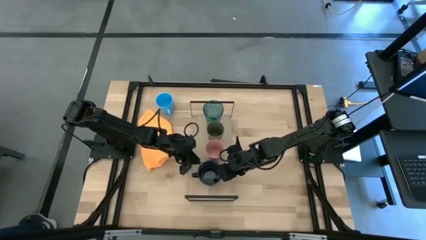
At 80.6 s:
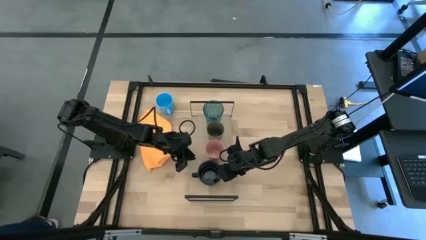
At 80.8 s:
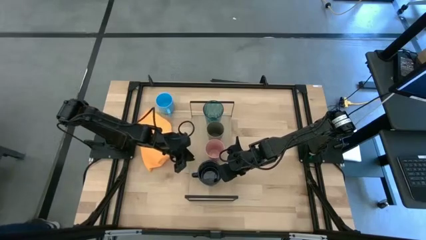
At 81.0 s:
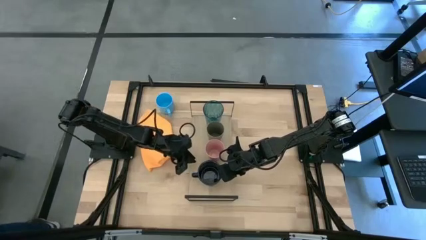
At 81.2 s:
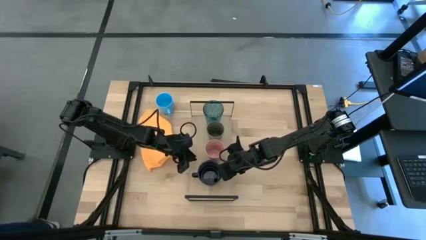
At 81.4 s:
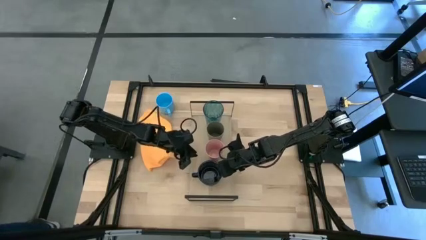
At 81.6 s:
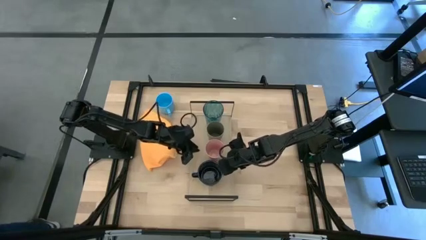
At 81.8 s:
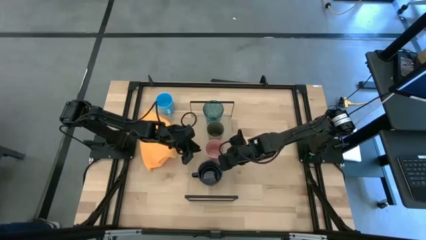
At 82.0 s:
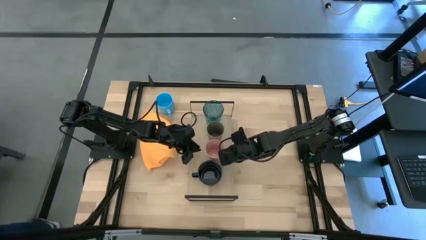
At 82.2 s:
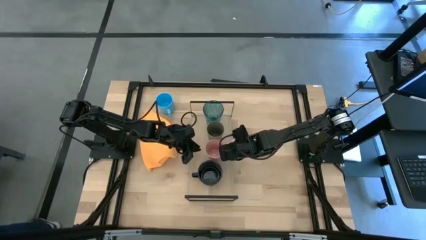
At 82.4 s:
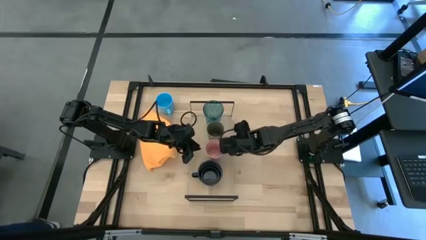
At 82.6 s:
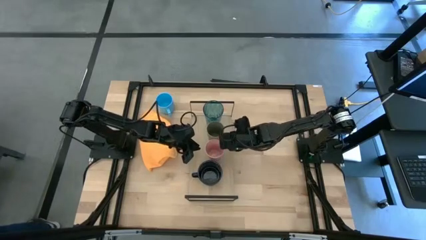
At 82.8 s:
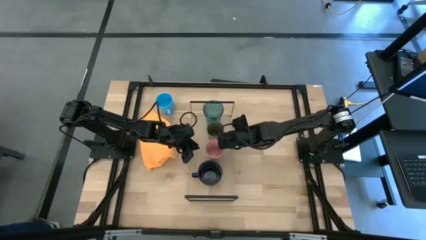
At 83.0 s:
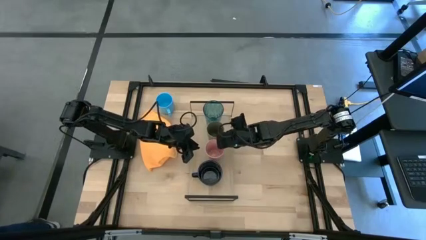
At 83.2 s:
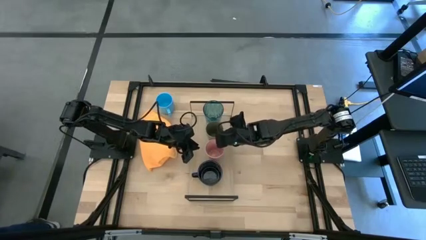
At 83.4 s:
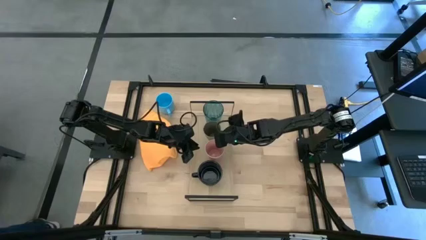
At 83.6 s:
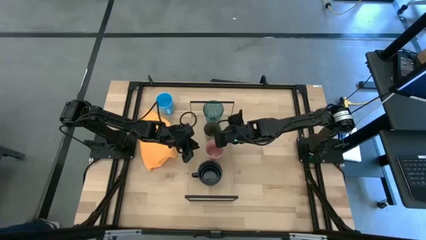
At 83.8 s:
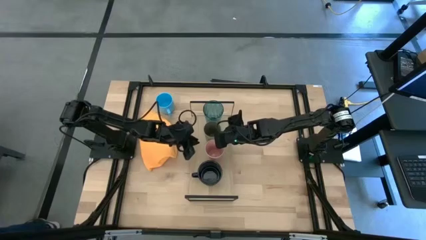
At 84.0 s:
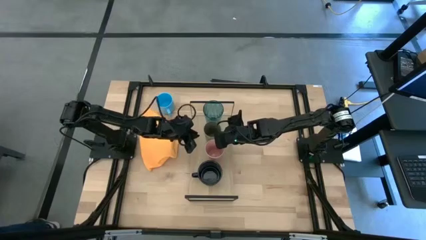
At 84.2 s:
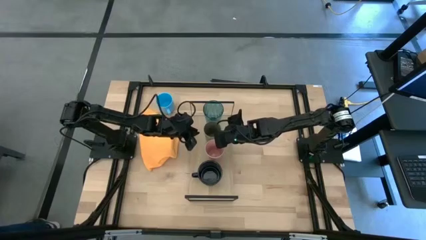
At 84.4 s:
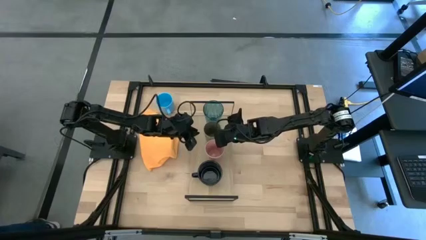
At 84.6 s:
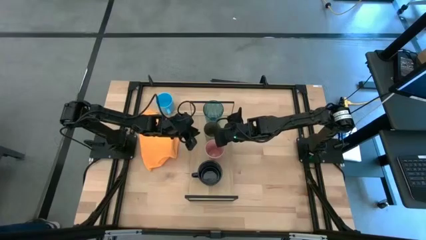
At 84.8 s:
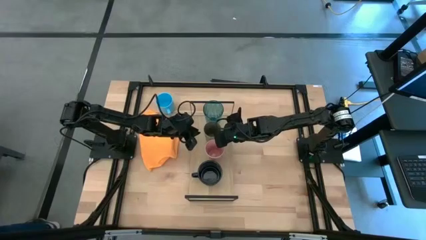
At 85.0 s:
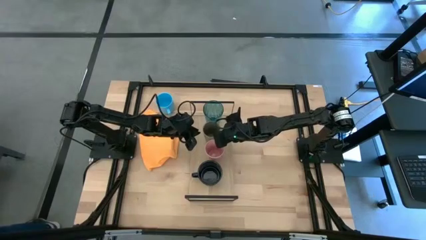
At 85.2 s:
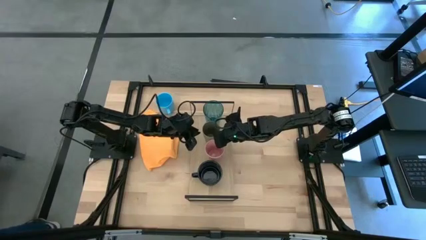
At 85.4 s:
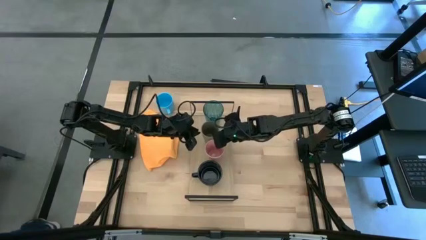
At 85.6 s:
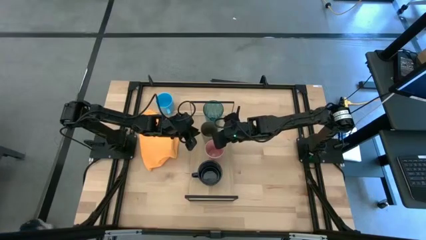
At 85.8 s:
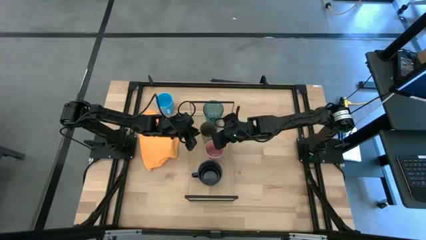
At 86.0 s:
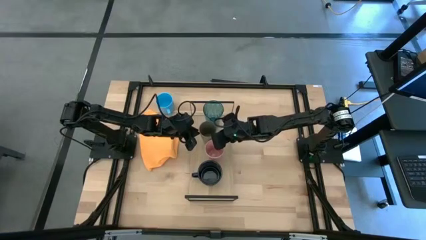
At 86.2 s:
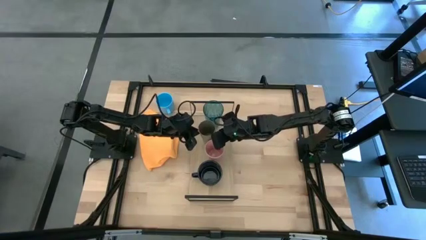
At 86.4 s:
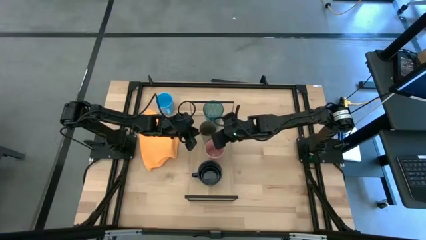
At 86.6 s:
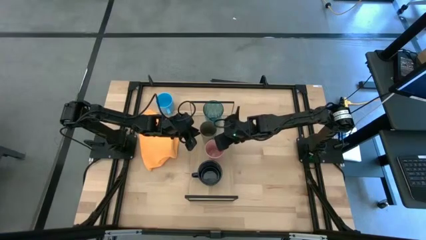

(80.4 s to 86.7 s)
Task: Stack small to large cups/mugs on shelf
Adjust the gray cup on the shelf

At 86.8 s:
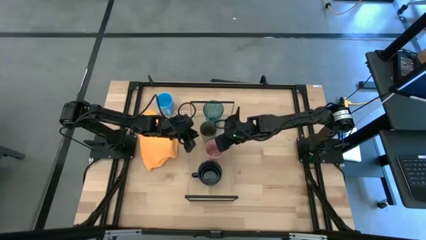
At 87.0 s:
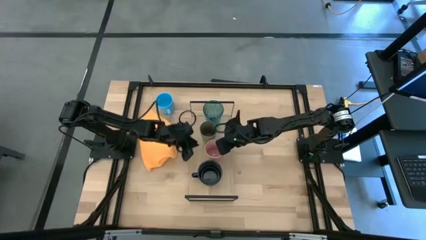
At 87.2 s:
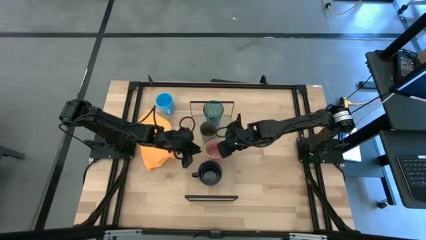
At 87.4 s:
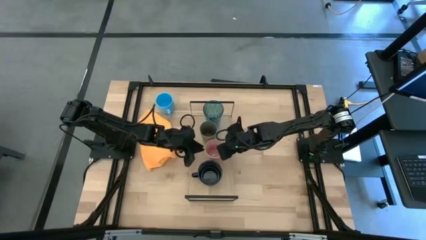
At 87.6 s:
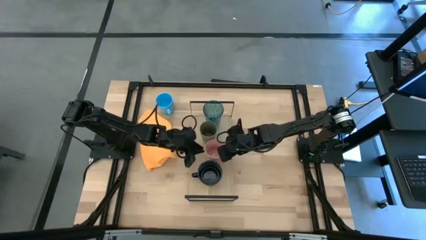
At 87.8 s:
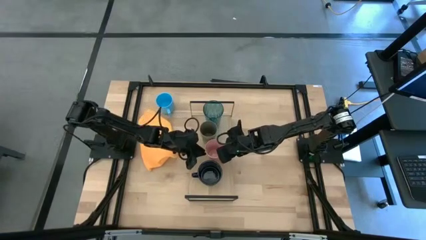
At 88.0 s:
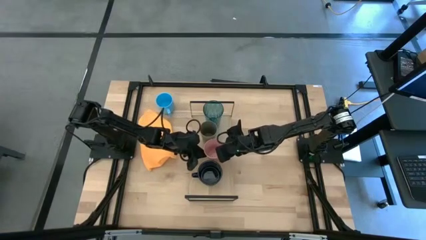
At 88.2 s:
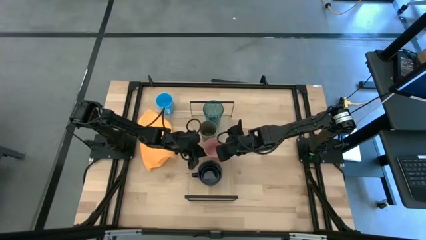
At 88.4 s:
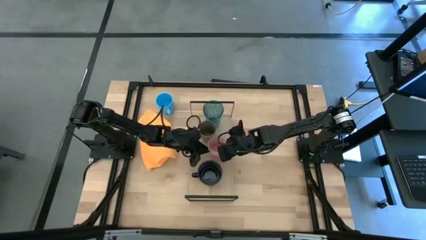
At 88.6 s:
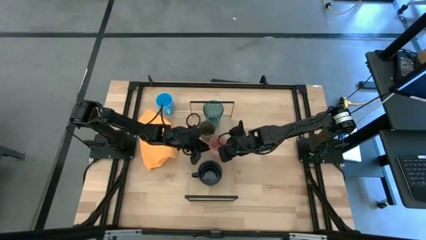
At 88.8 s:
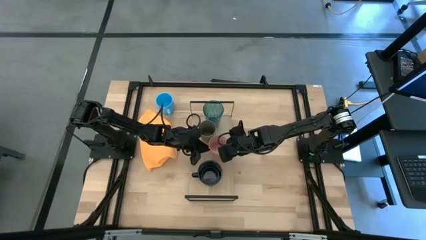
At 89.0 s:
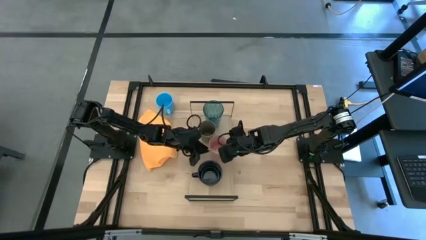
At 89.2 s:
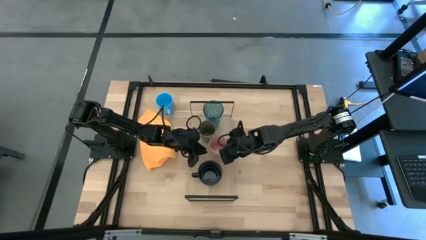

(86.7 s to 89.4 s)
Adjust the pink cup on the shelf

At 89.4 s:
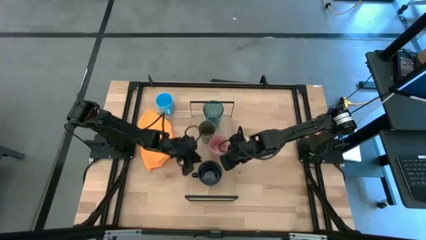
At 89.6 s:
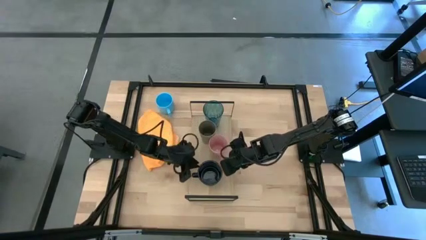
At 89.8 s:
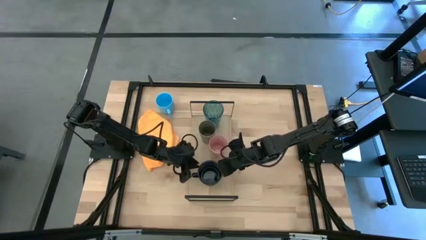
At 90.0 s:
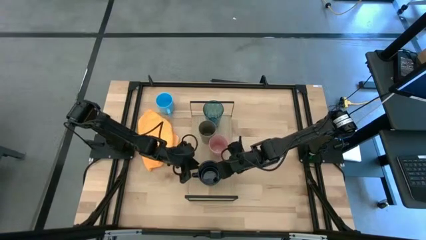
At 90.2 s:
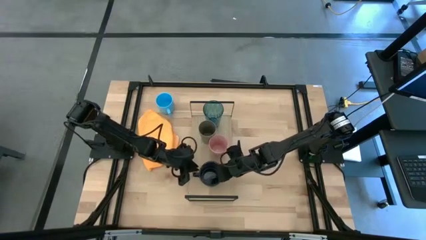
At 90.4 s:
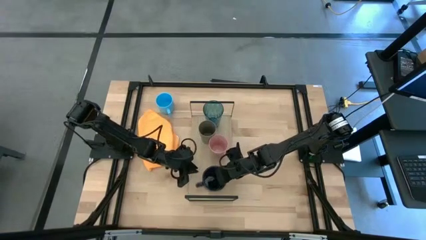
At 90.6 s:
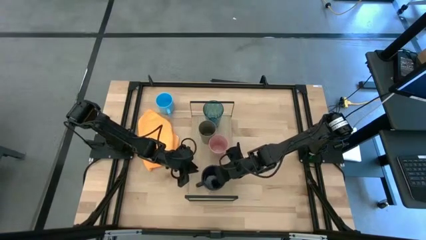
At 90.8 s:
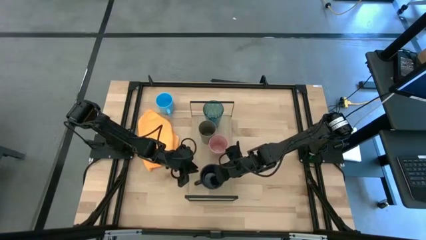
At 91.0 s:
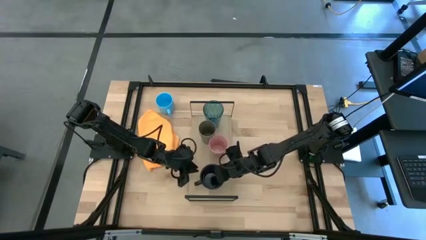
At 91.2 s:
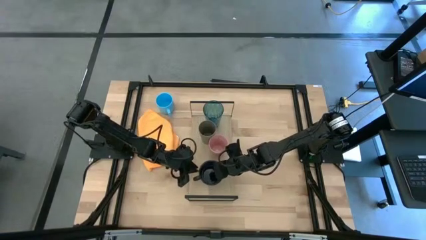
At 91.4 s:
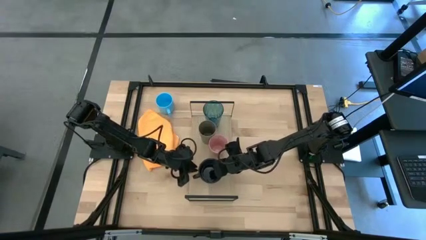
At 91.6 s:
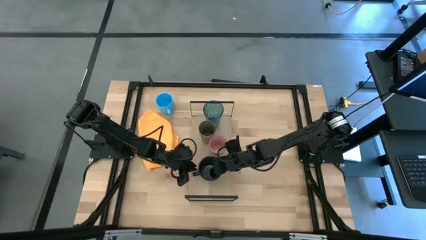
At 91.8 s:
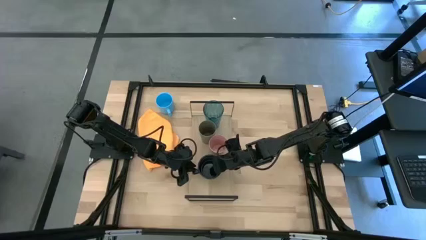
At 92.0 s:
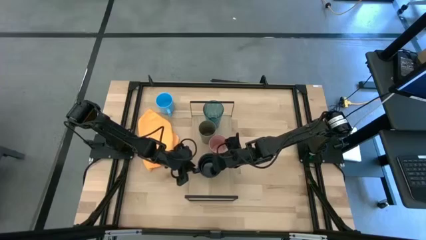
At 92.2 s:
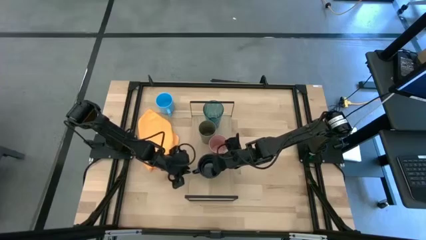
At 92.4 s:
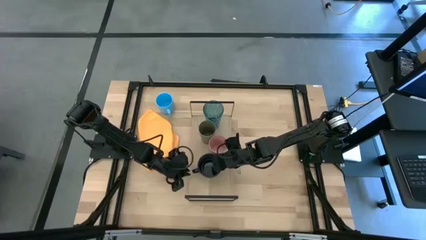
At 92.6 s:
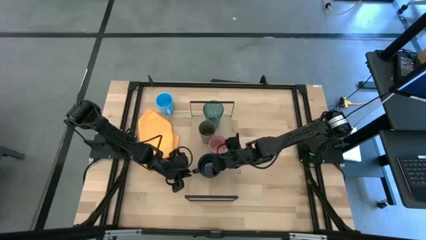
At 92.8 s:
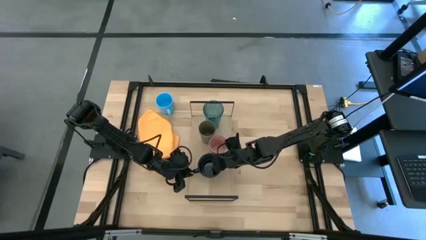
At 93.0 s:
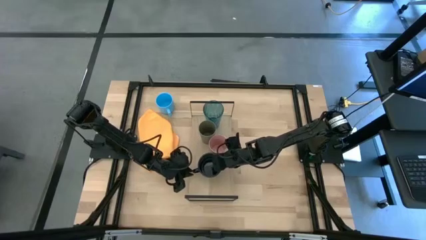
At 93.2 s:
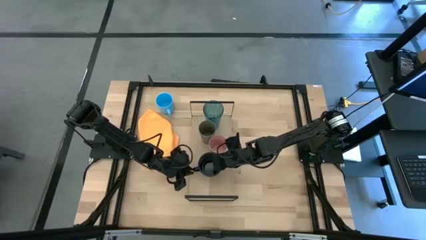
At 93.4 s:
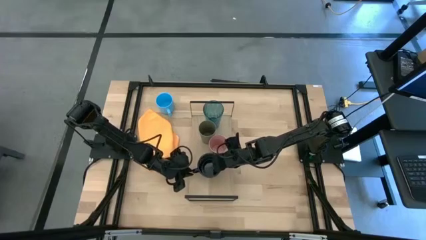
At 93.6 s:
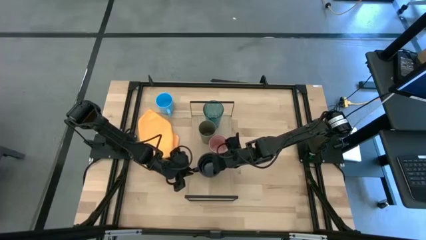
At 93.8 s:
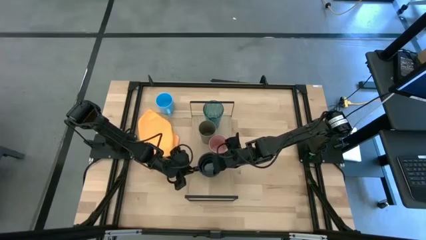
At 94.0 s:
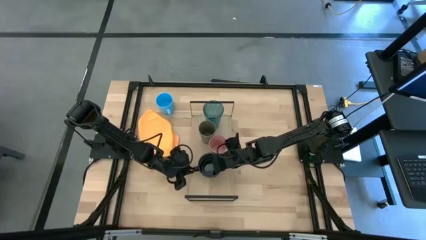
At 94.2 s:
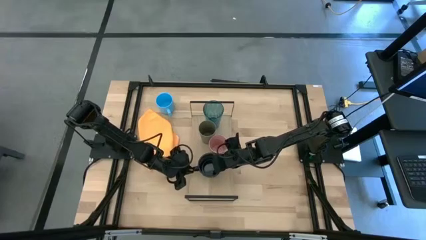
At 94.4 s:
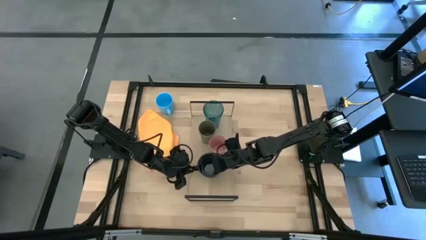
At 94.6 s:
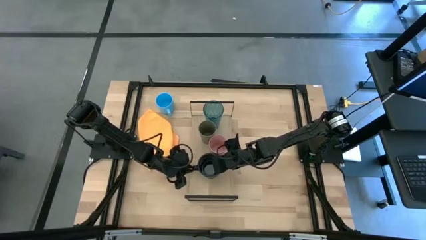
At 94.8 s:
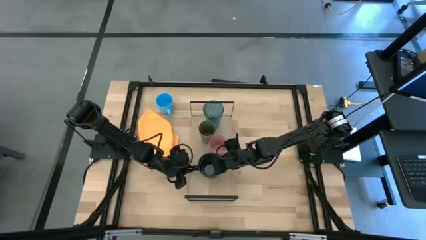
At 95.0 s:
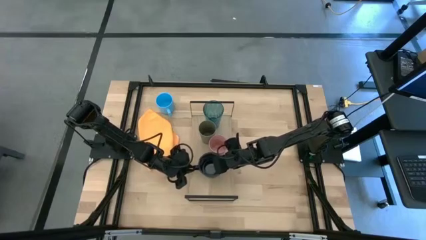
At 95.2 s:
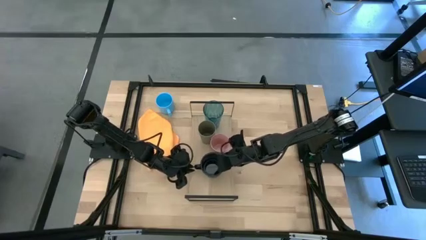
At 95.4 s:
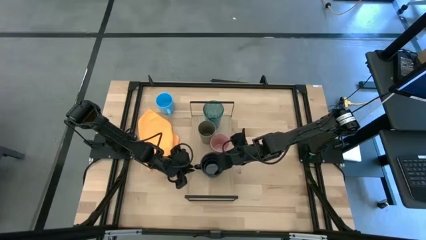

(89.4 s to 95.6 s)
Adjust the dark blue mug on the shelf

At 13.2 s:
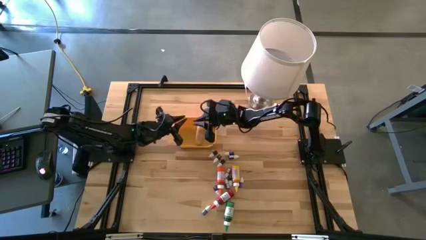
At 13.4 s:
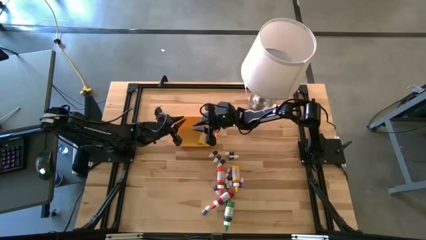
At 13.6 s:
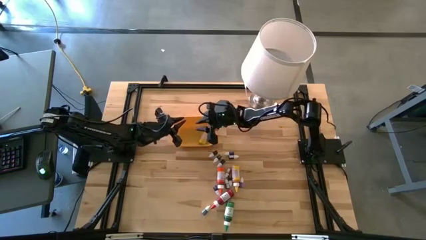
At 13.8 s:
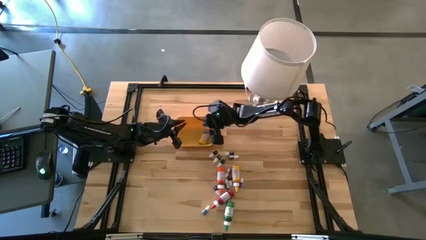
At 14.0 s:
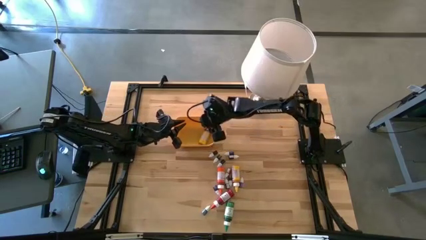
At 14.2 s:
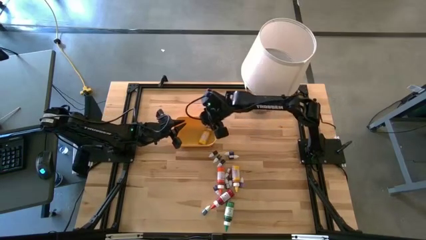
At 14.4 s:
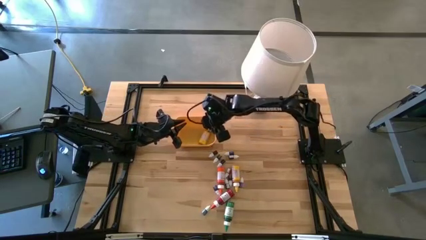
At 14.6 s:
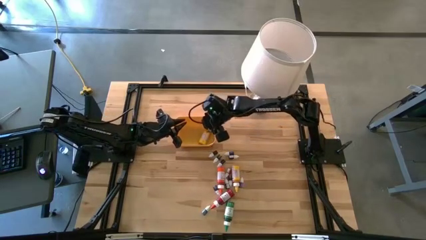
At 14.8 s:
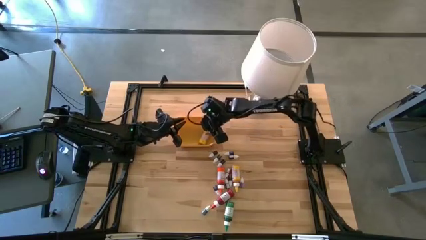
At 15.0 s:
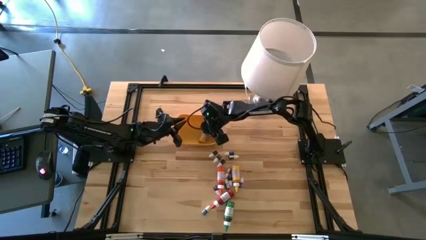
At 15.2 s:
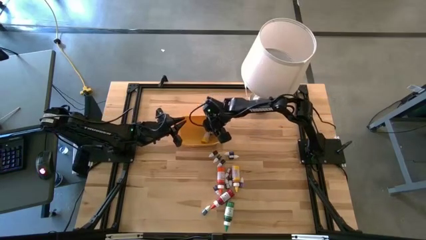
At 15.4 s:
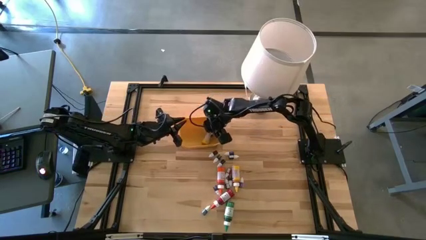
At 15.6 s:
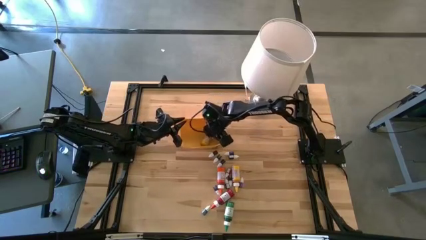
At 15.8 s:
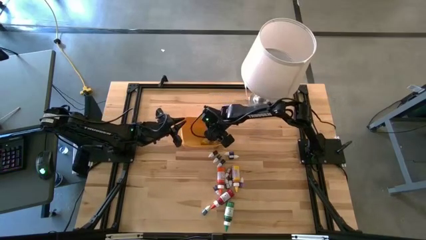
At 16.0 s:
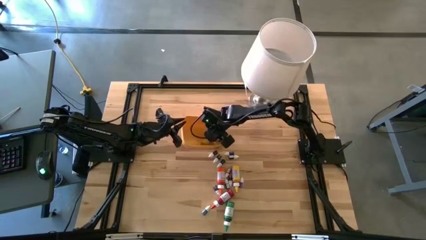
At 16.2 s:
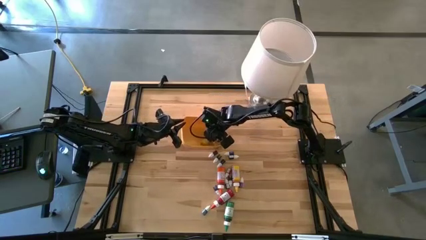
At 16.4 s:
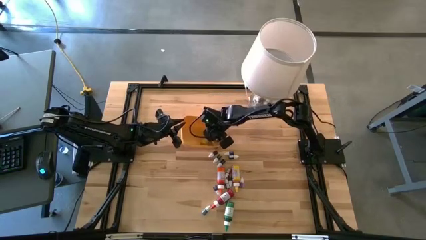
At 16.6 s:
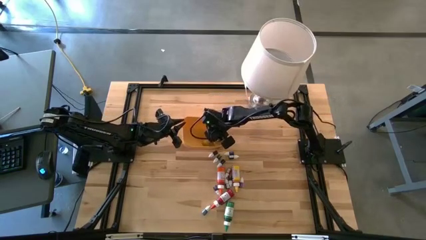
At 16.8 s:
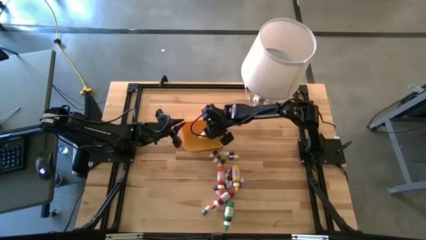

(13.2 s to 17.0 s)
Task: Pick & Place food coloring
Adjust the large yellow food coloring bottle in the yellow bin
